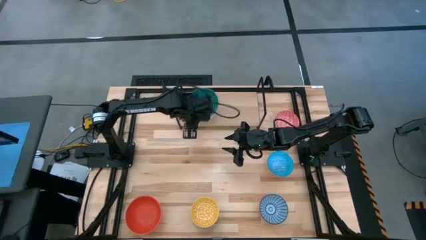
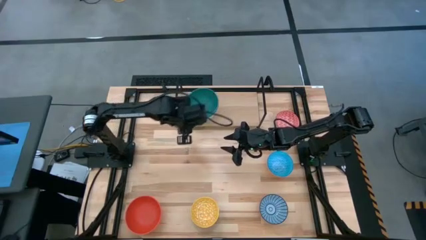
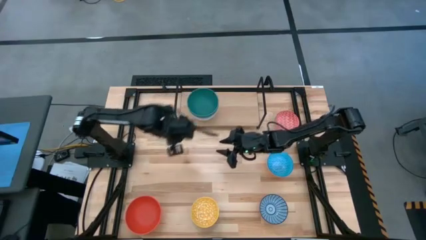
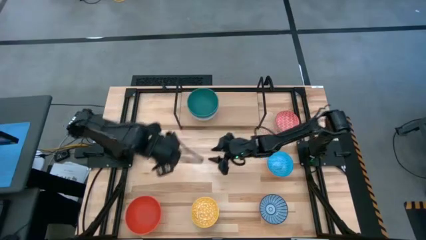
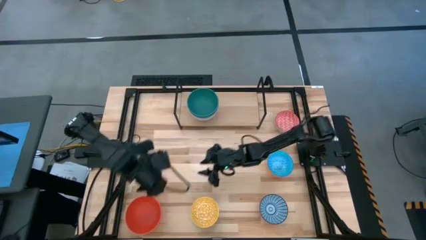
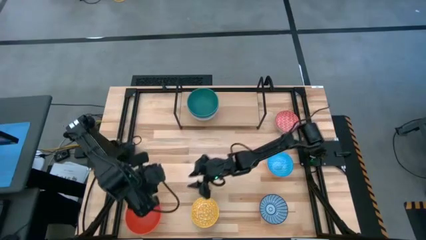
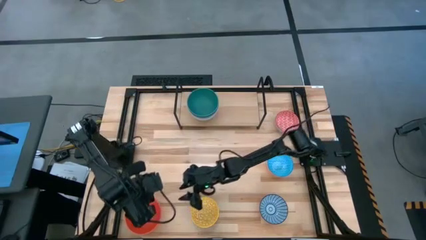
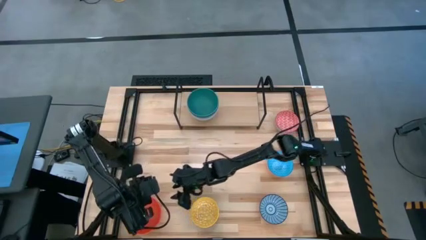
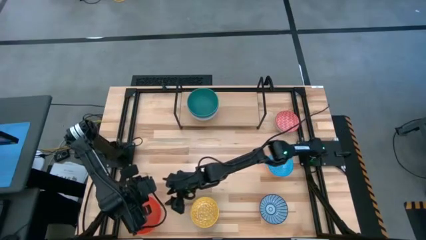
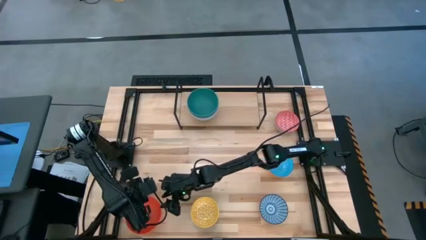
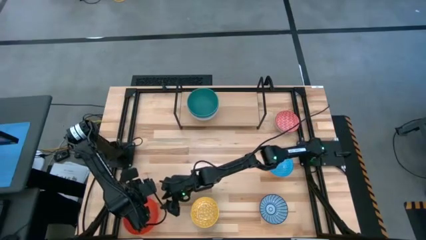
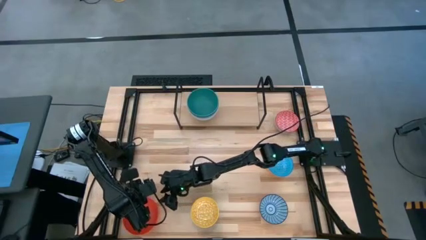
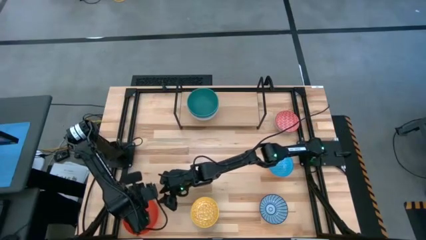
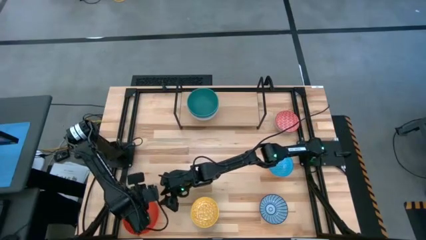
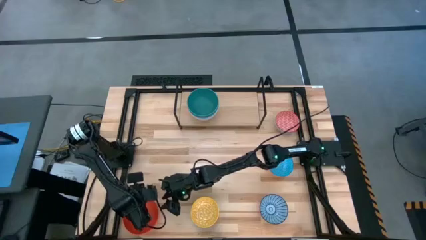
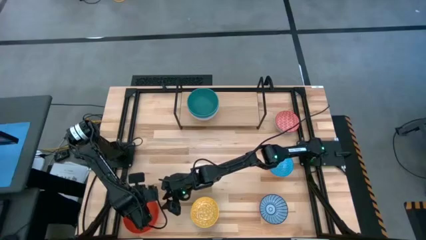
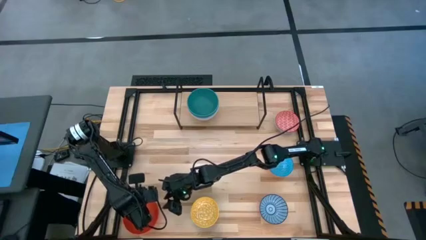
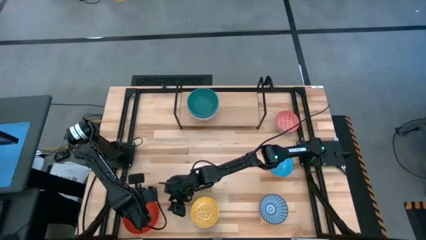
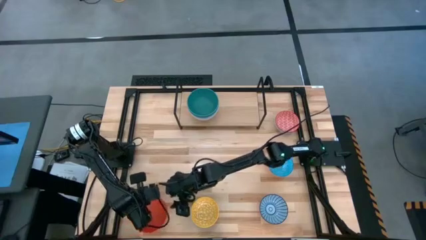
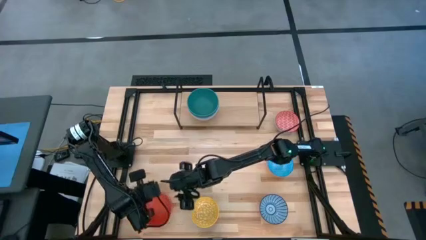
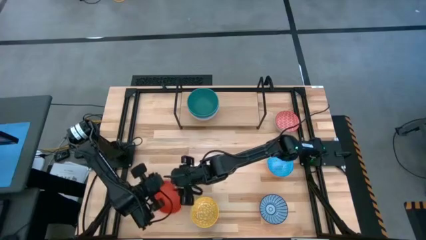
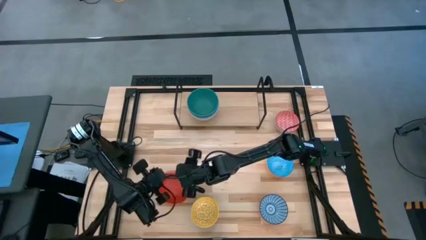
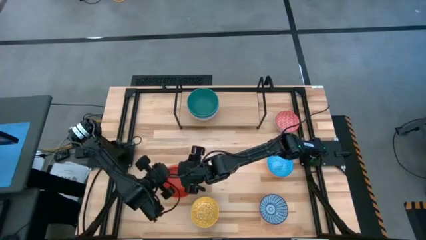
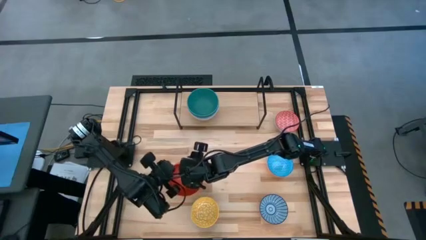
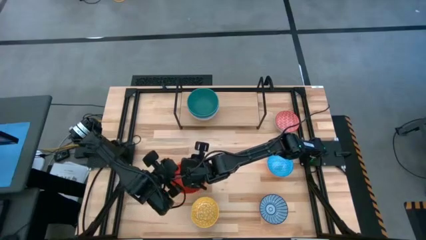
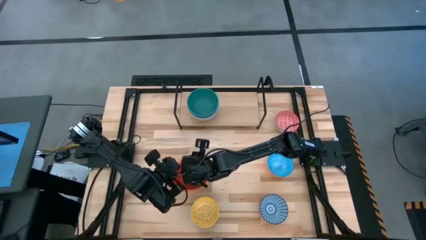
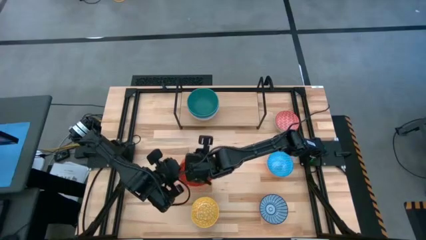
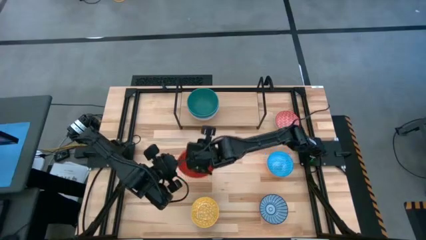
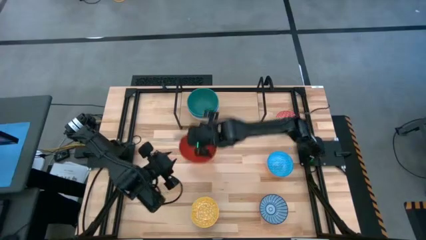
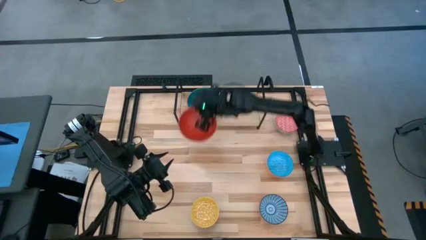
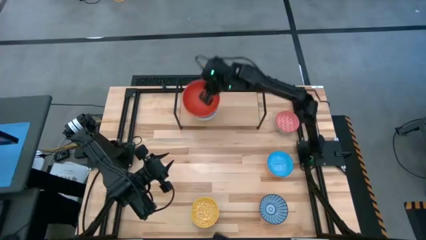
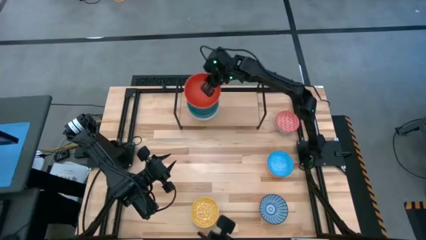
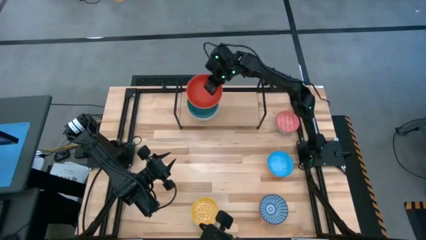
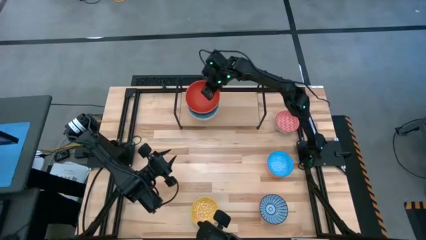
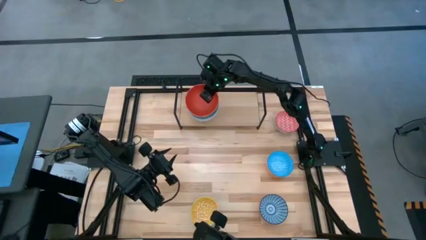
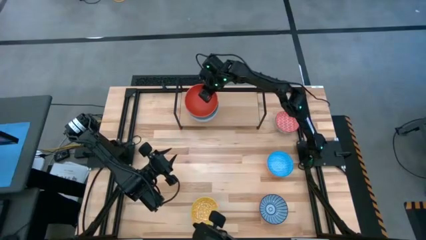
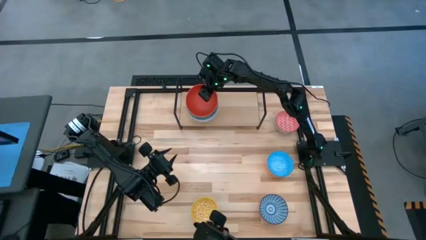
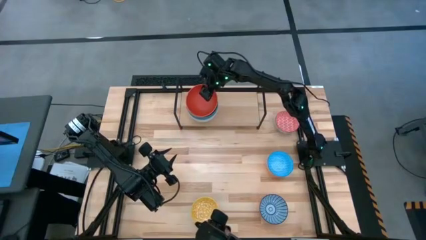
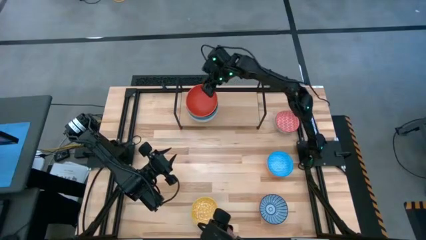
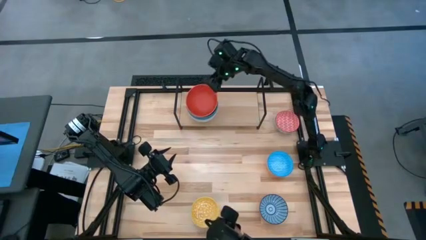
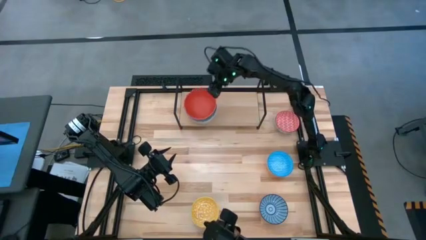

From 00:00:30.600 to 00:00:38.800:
Task: Place and stack bowls onto a shelf
Stack the orange bowl on top of the green bowl on the shelf

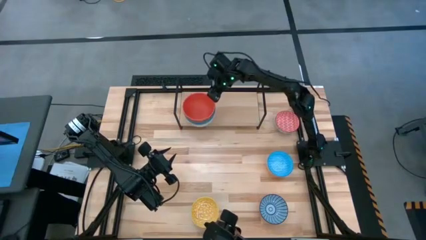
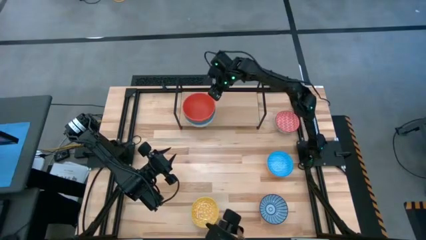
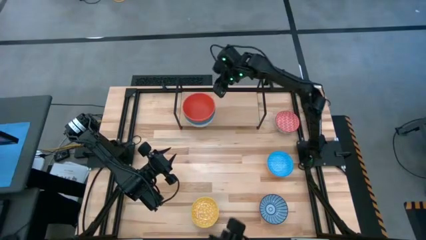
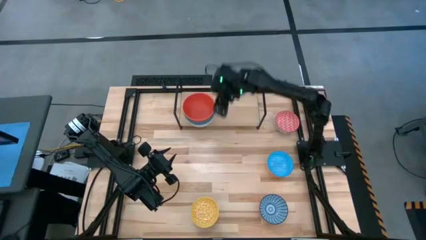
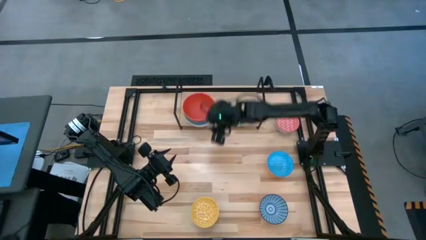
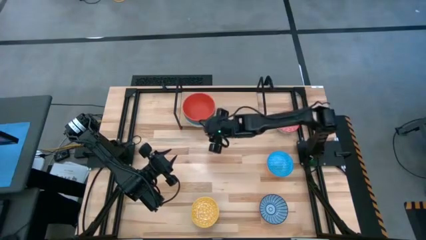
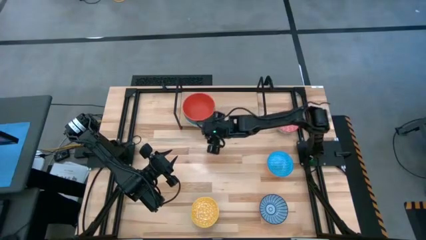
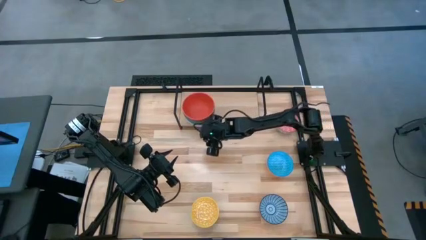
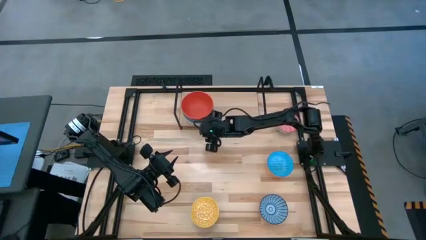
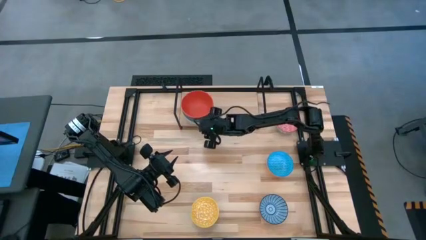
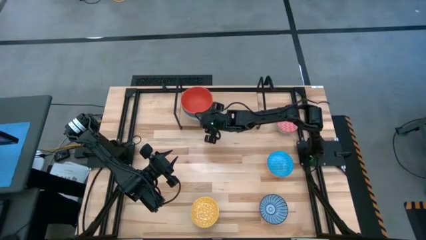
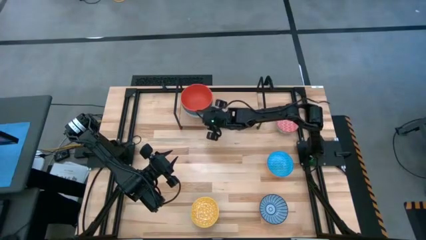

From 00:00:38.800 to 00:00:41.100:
Adjust the stack of bowls on the shelf

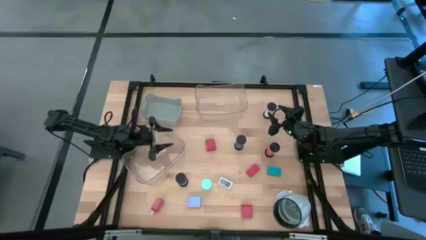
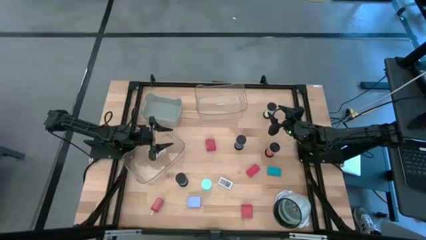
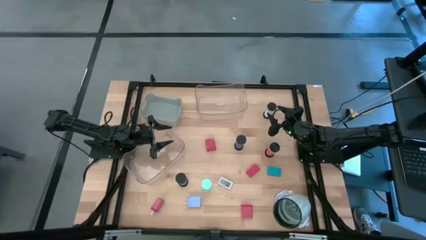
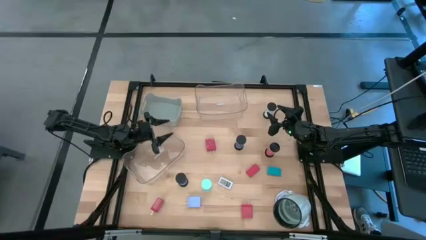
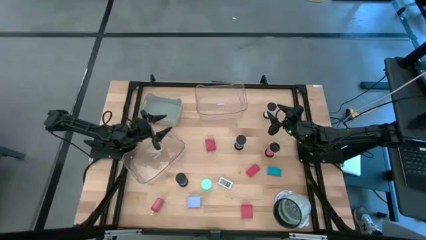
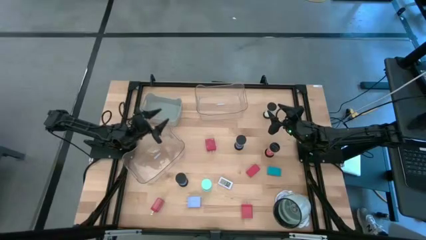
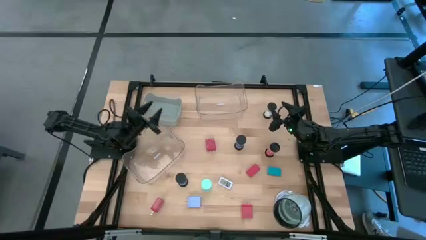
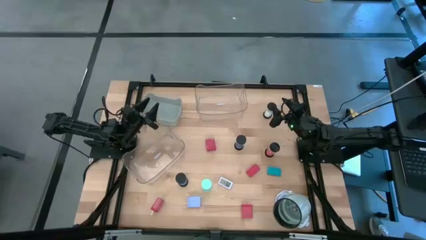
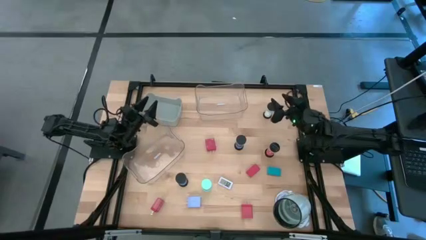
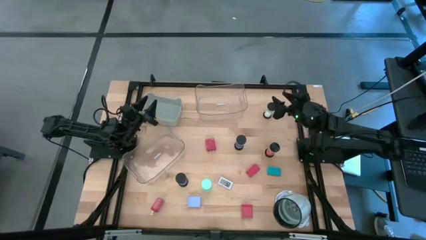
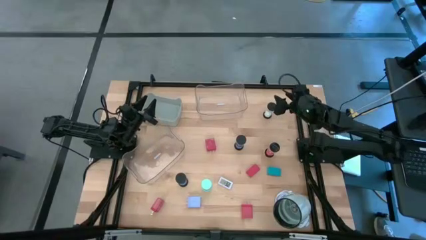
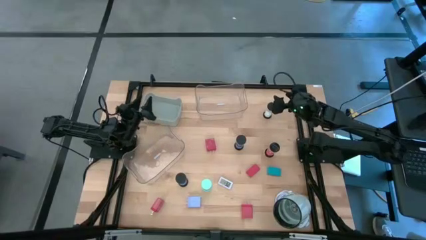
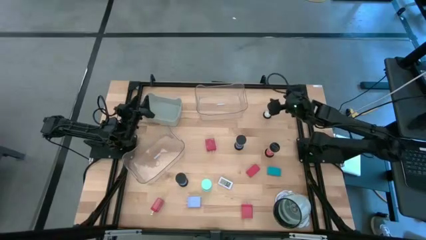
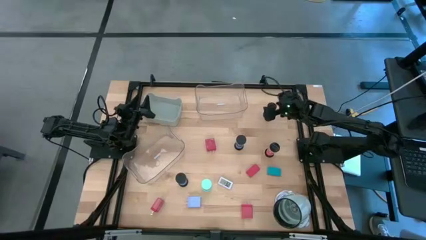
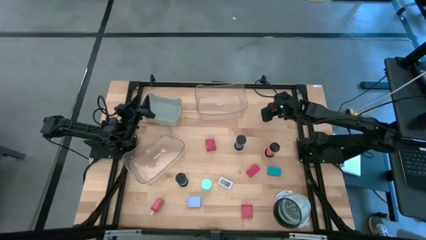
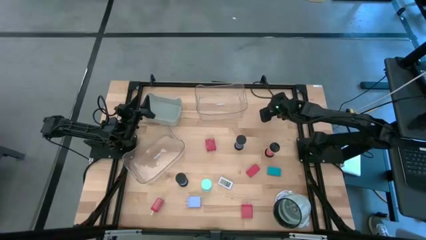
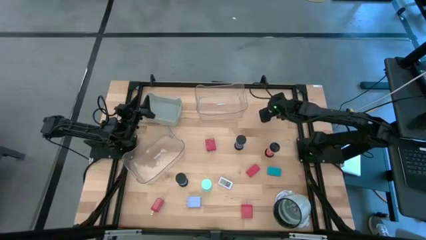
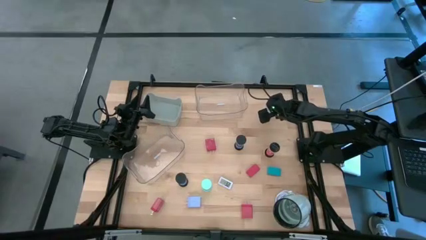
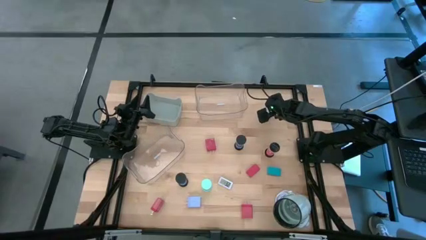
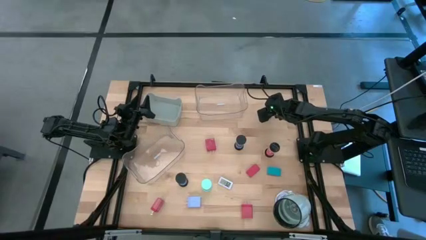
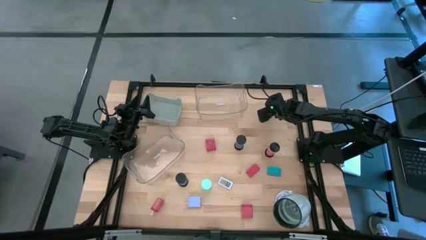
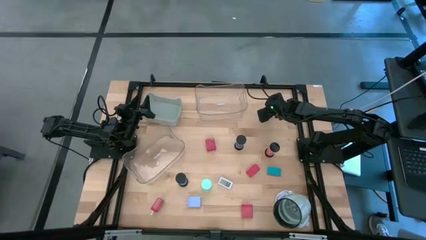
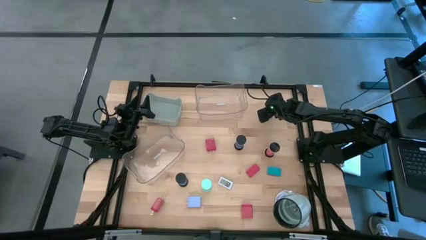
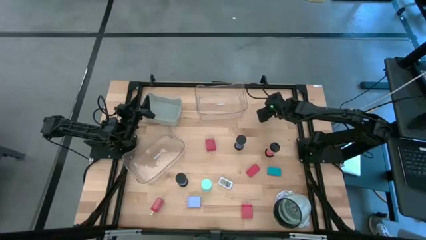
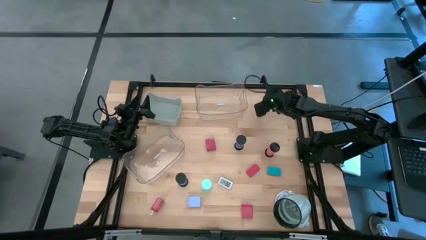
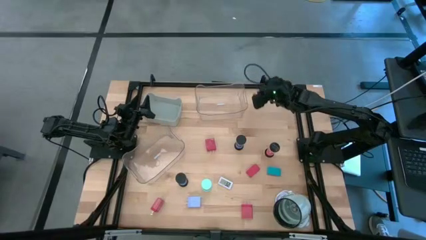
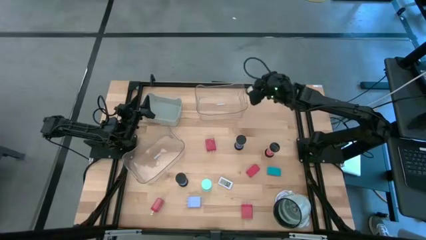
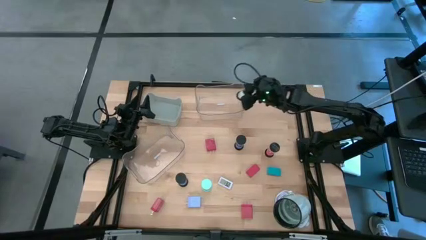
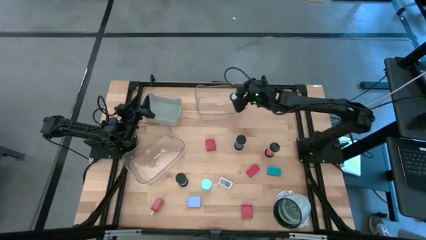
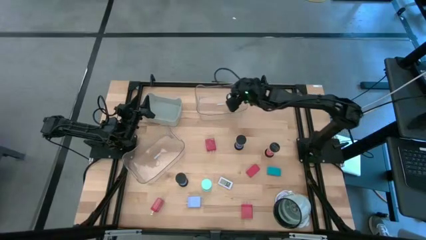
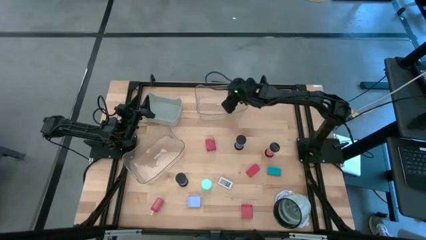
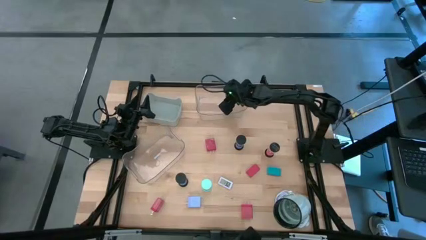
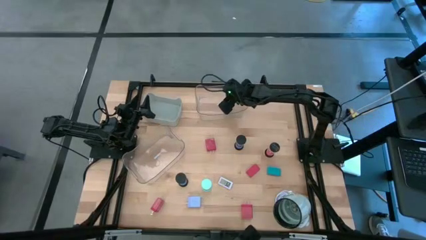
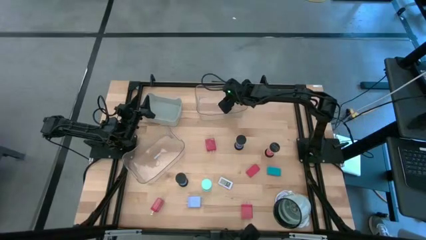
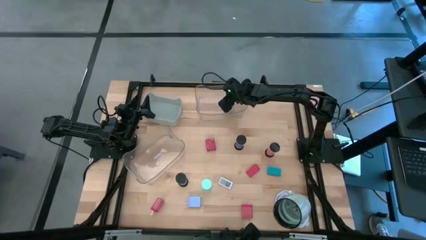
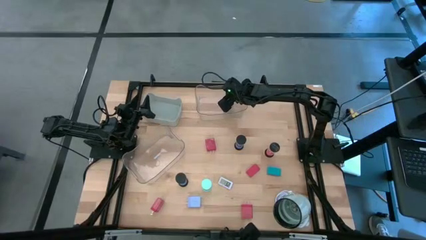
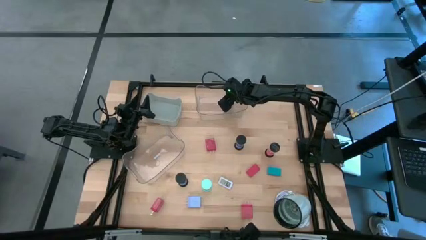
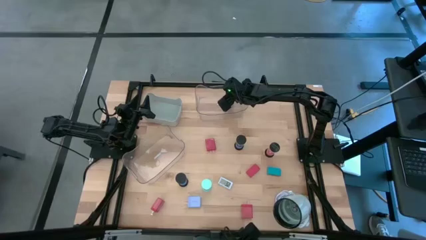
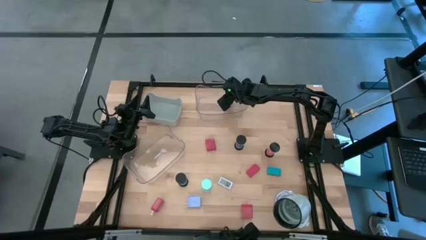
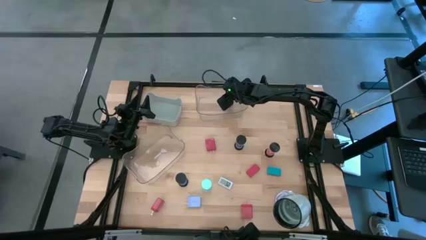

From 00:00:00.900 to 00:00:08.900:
Task: Pick & Place Office items
Put the white hourglass into the top transparent bin
